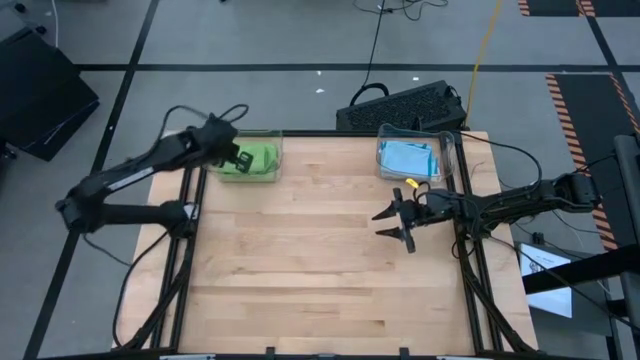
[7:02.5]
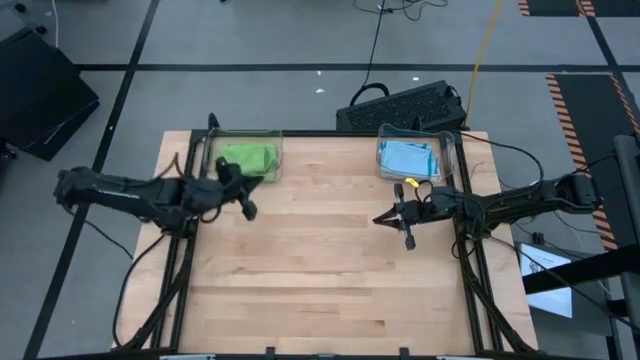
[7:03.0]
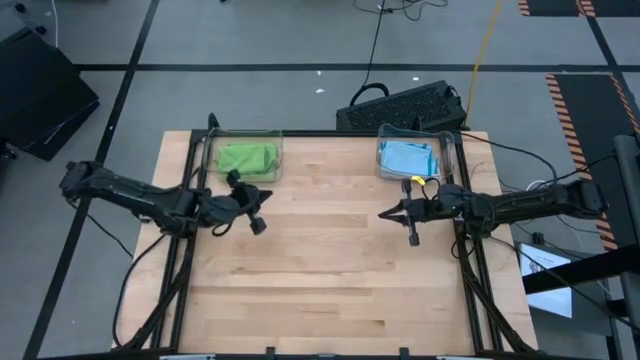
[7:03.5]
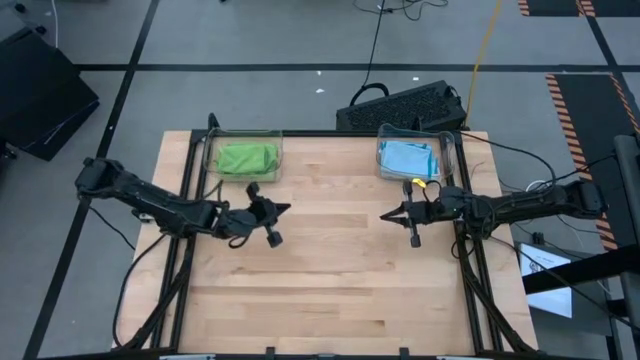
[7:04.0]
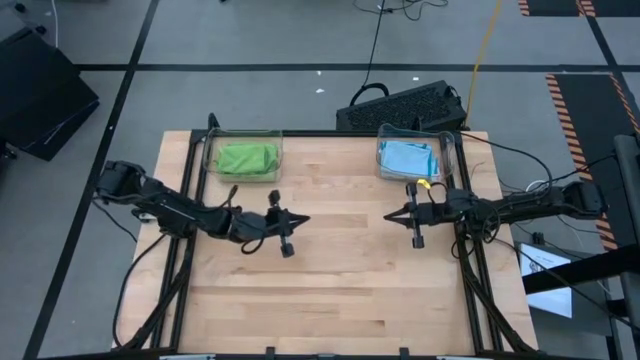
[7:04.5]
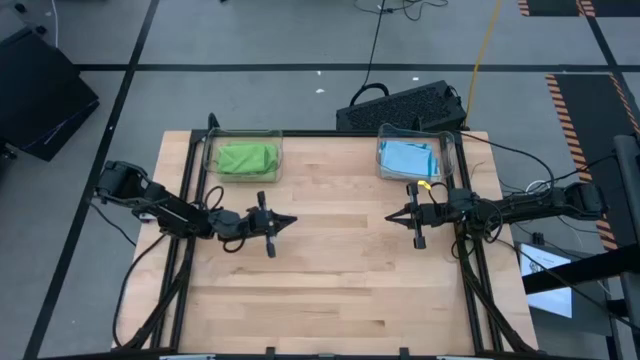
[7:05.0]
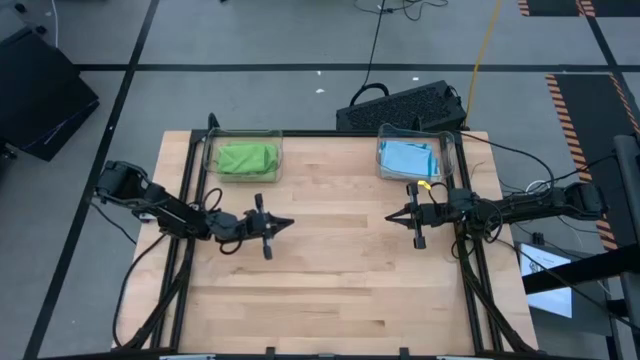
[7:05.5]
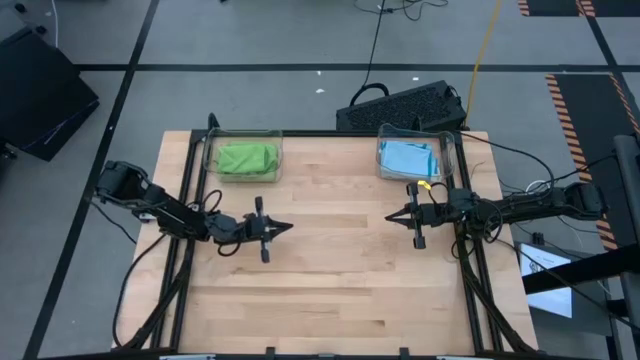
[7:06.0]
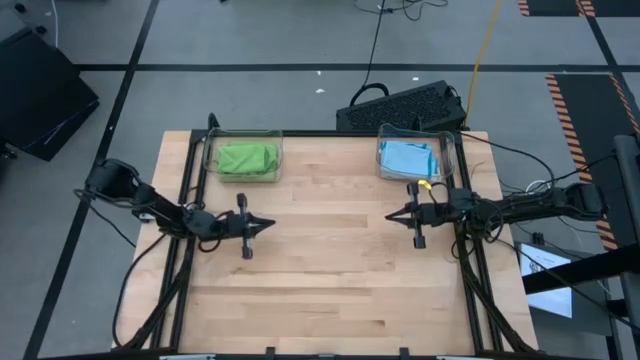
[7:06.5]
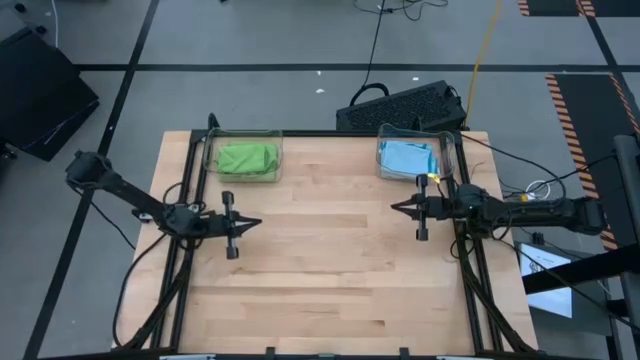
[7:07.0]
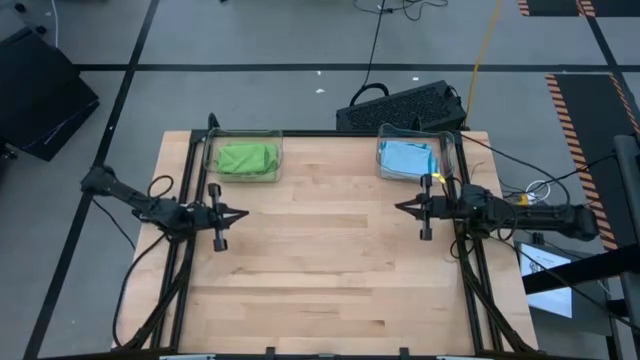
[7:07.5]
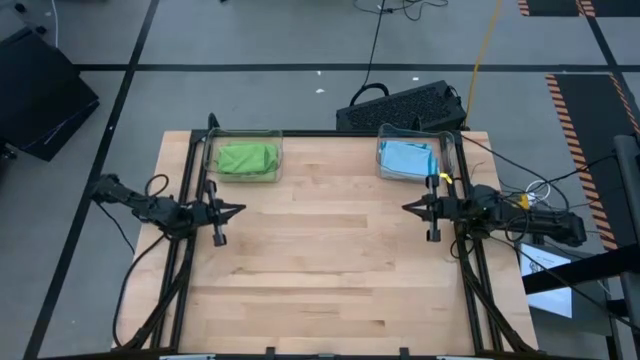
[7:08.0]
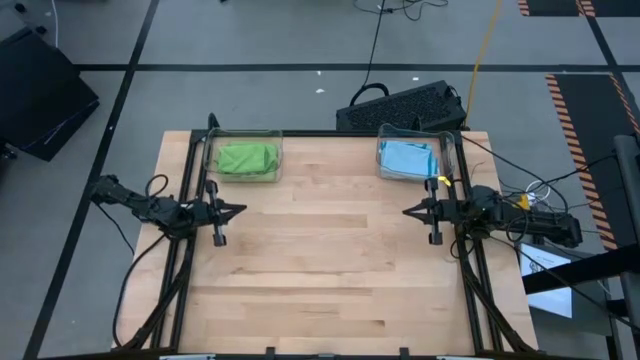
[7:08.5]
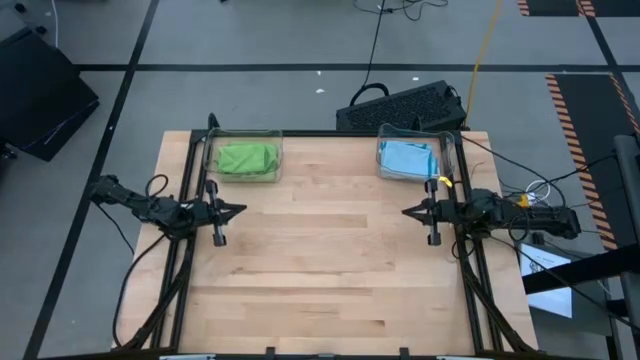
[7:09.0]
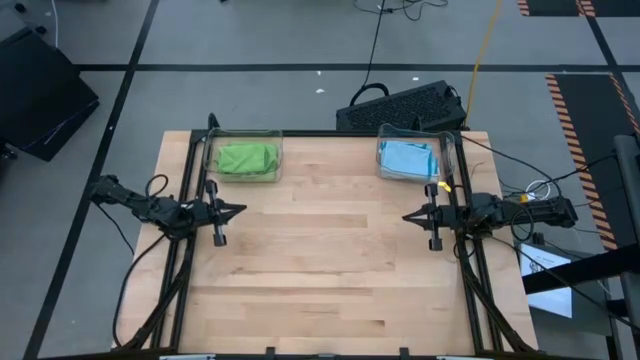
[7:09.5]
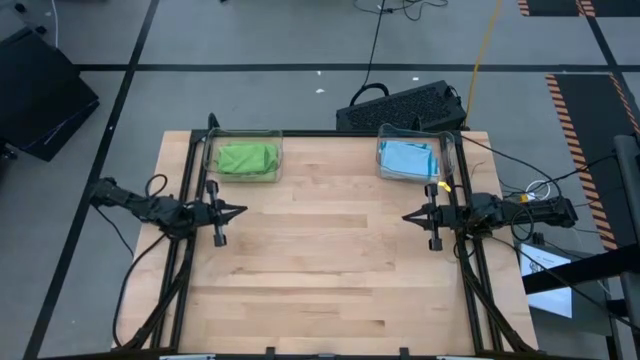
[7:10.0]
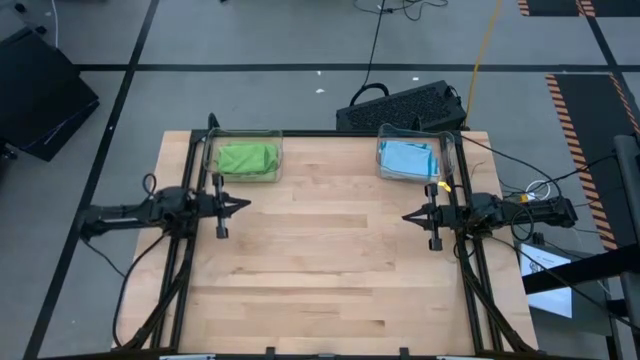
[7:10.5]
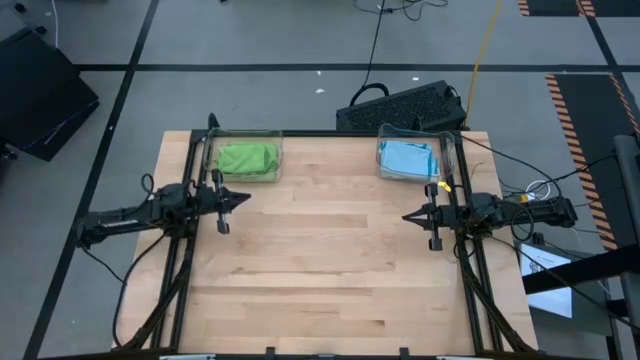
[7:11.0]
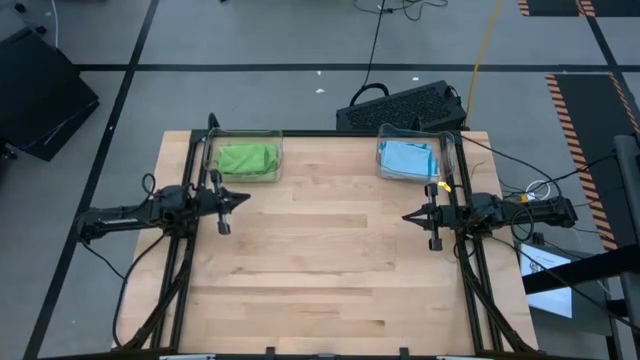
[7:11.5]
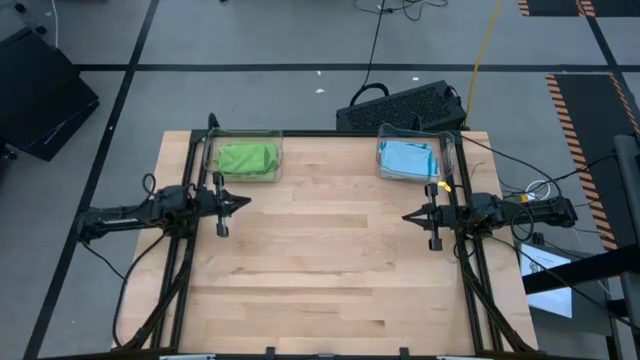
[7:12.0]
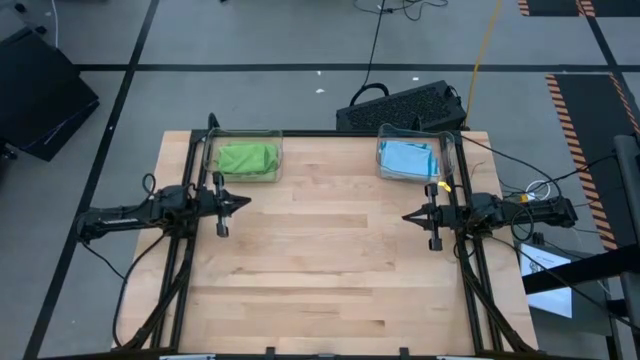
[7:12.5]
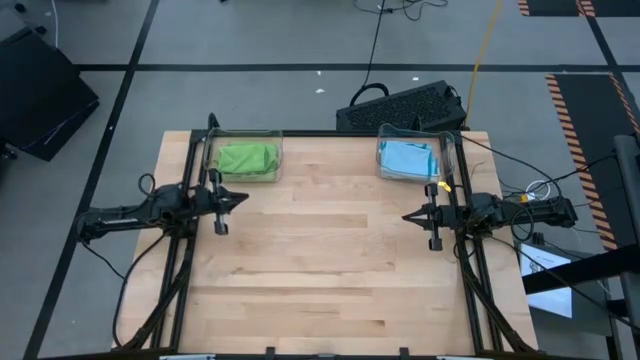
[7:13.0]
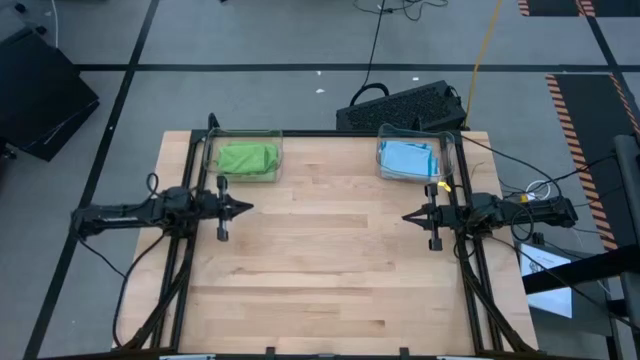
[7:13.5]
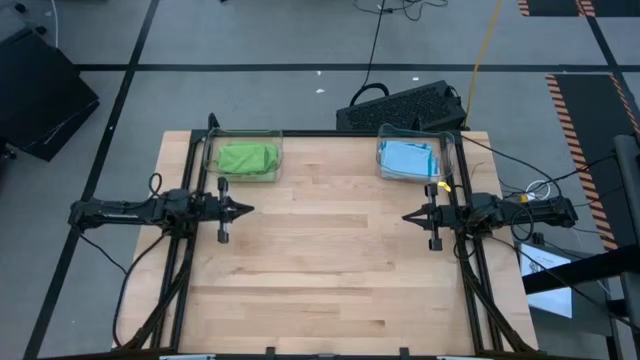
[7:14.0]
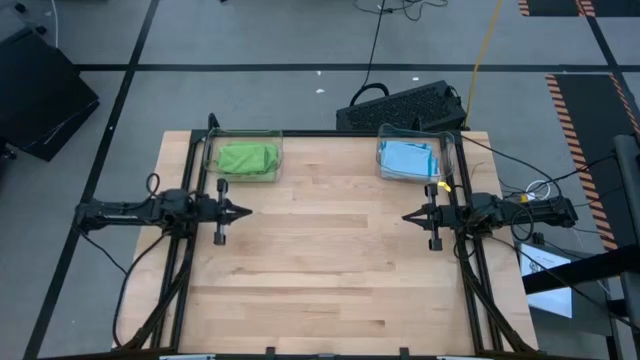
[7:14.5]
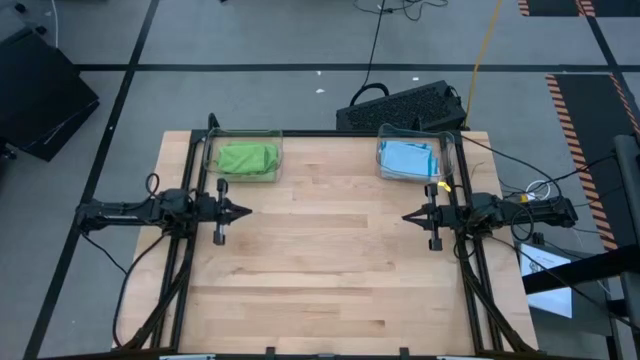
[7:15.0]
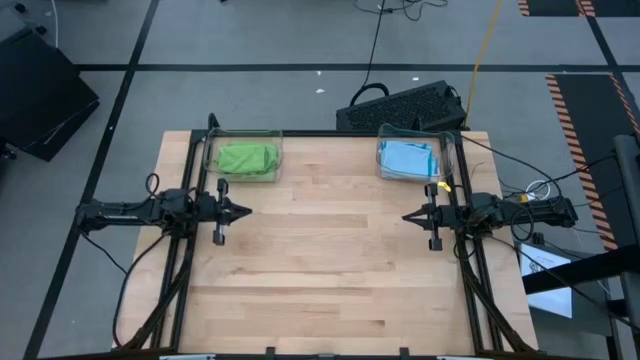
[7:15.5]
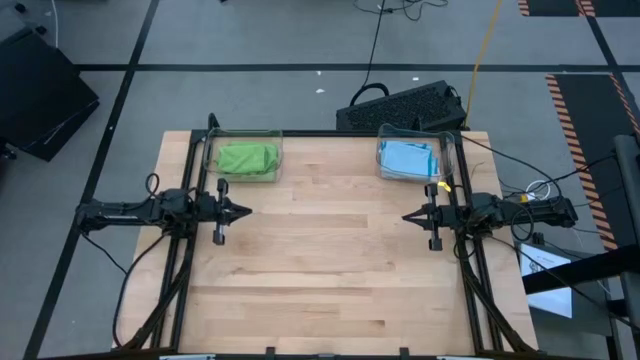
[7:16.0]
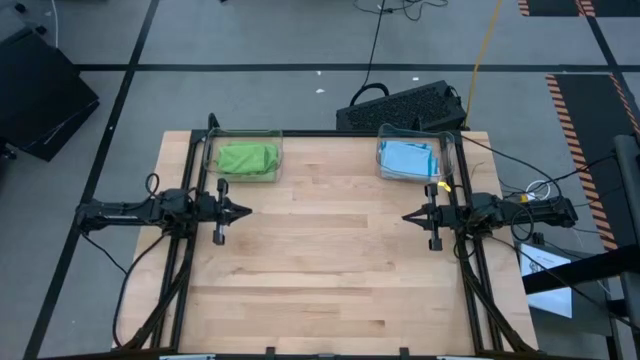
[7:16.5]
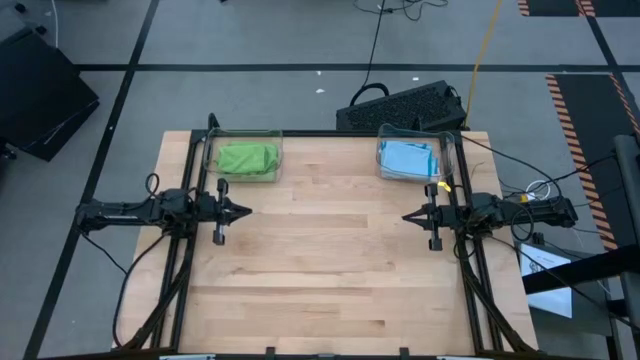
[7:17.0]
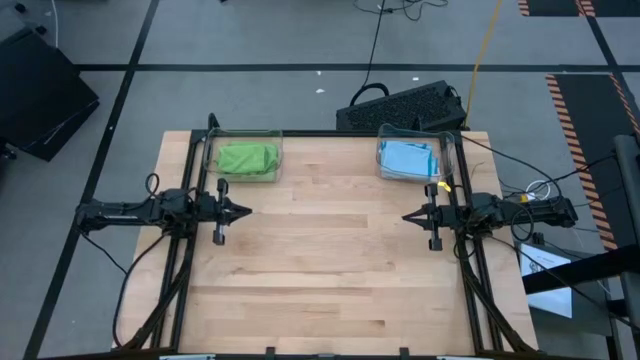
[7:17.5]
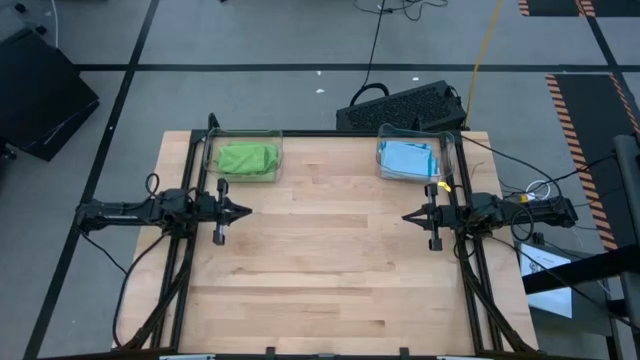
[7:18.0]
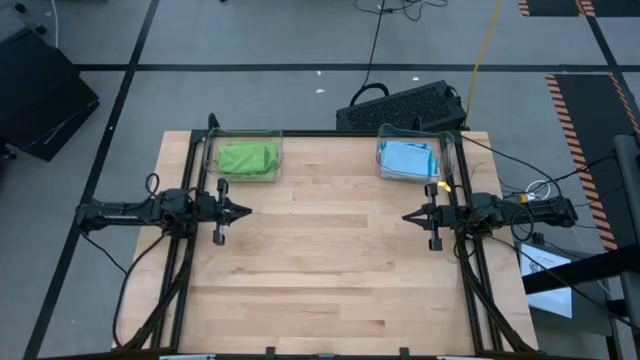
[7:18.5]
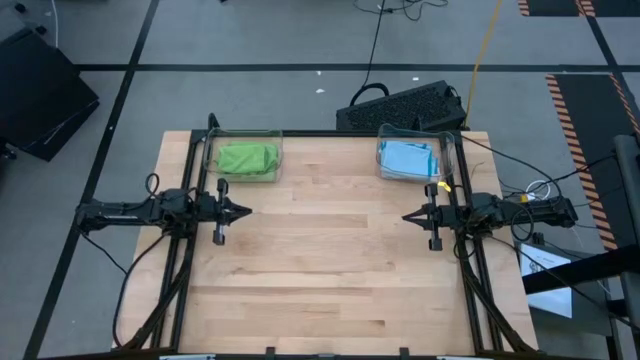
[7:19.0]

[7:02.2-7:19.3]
Task: Fold microfiber towels
Return to Home Position

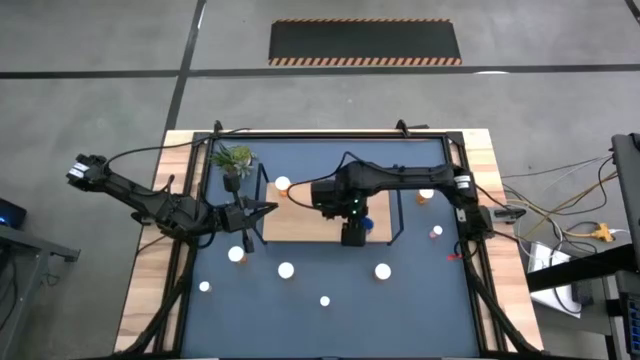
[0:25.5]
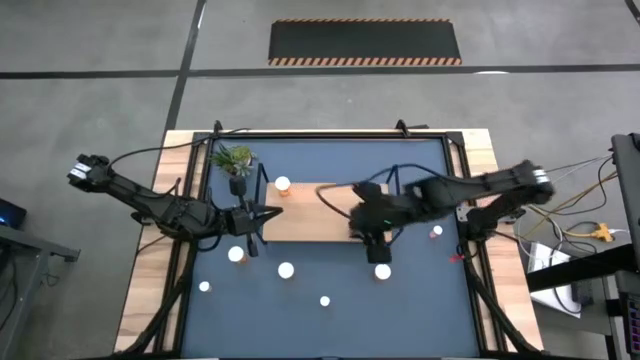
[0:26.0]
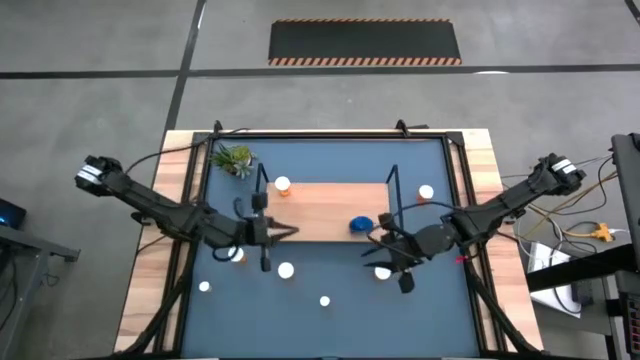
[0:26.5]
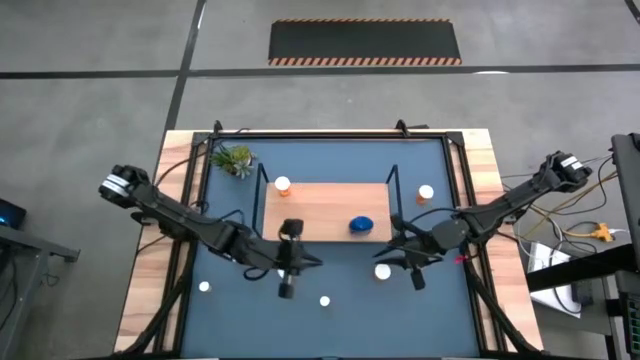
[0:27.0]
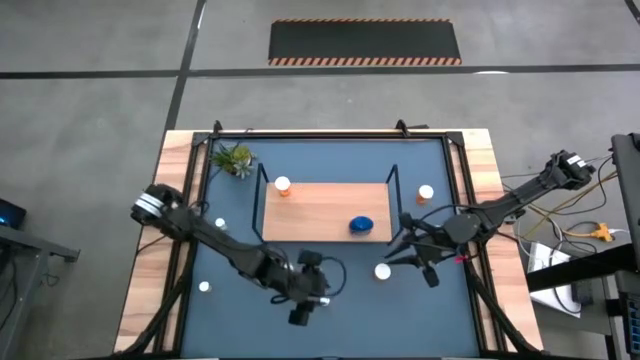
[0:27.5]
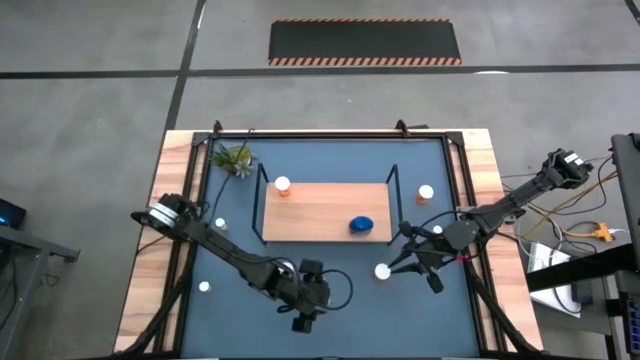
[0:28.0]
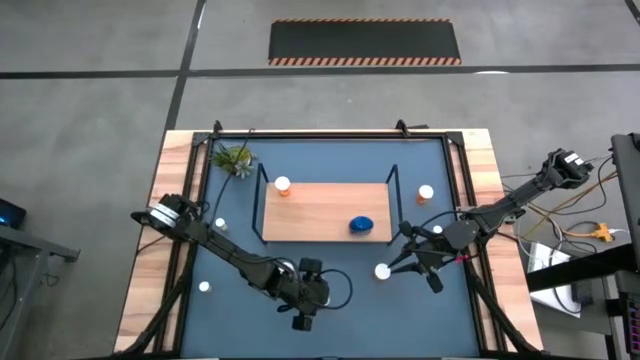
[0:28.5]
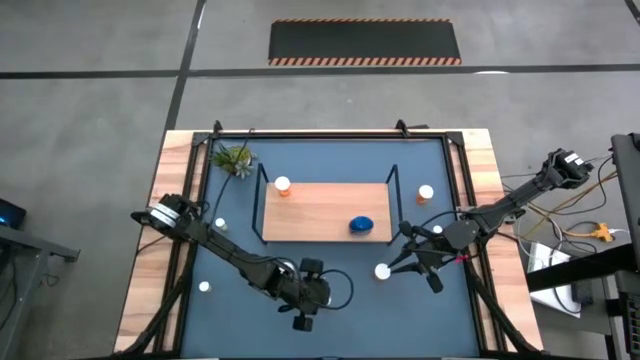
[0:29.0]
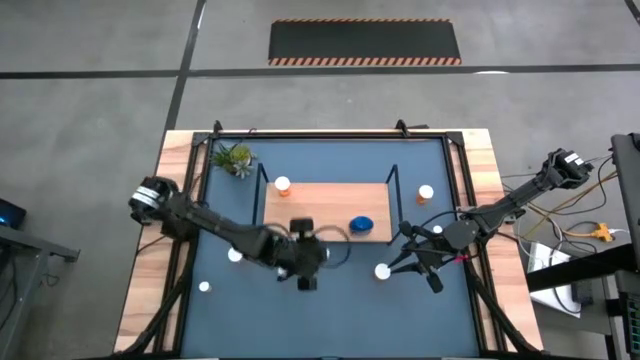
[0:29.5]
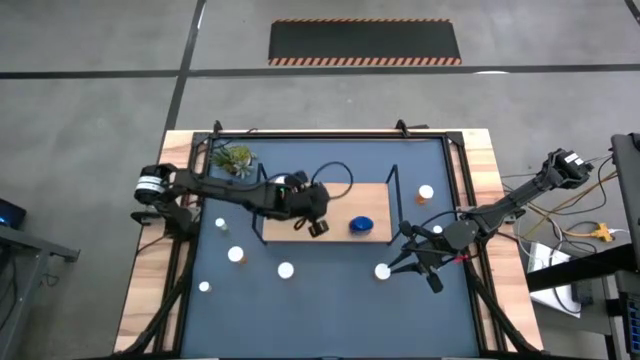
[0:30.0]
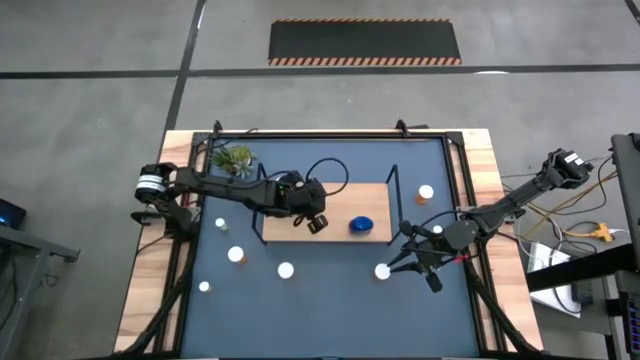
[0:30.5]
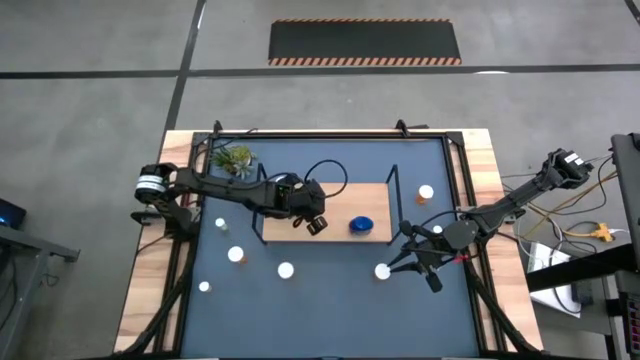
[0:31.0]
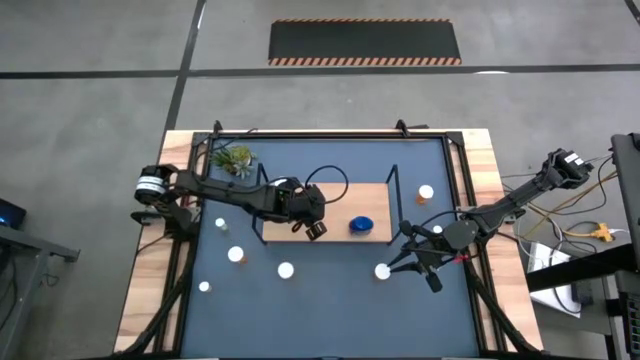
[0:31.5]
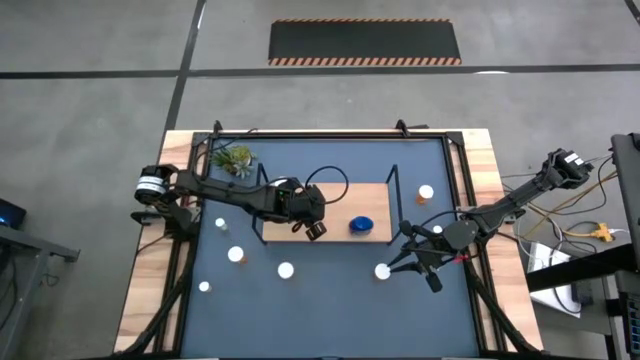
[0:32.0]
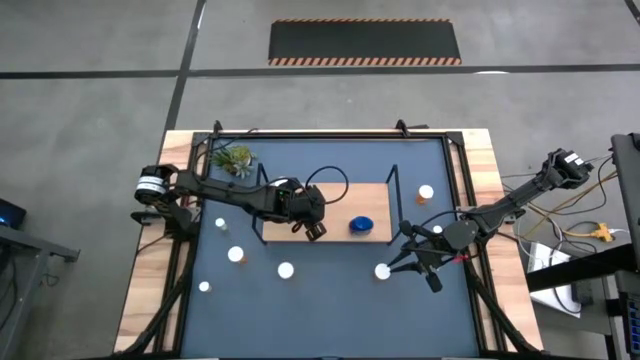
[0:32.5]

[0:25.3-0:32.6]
Task: Pick and place medicine bottles onto shelf by color
Put the small orange pill bottle on to the shelf
